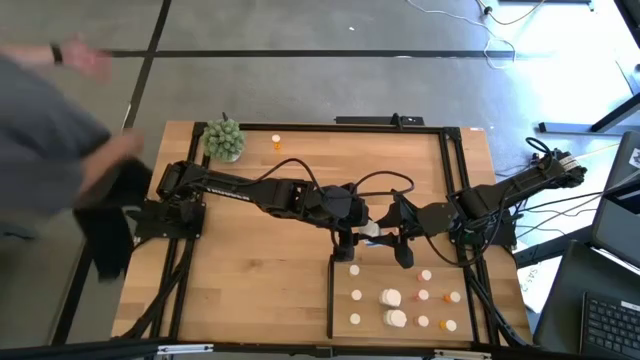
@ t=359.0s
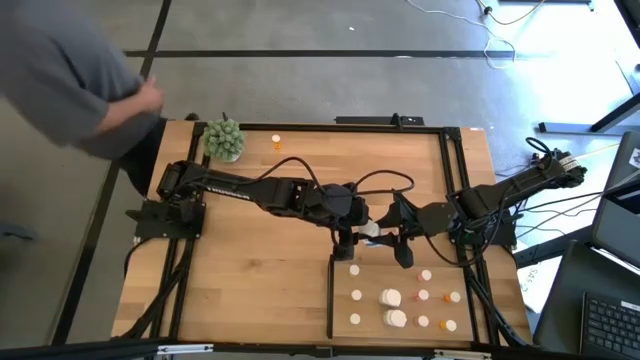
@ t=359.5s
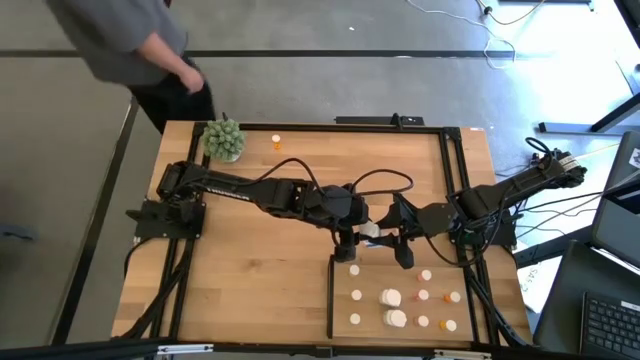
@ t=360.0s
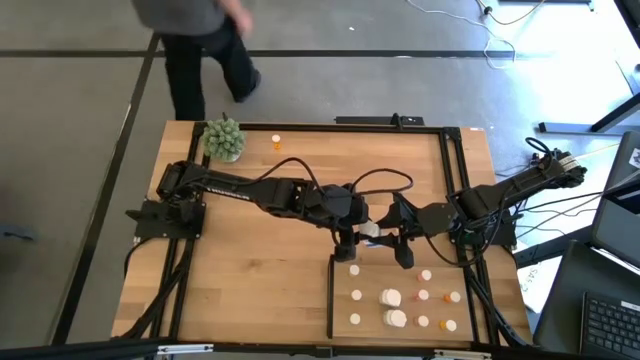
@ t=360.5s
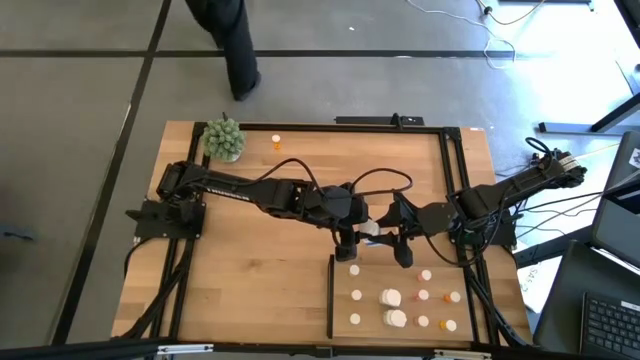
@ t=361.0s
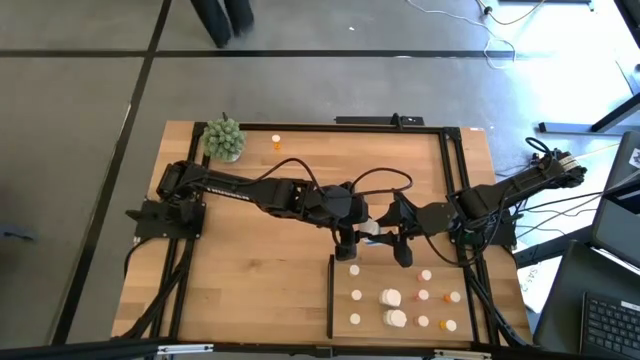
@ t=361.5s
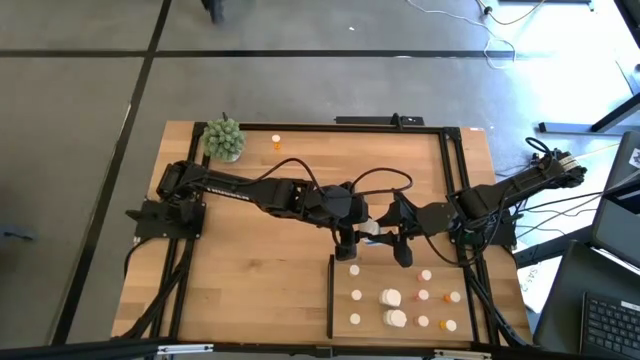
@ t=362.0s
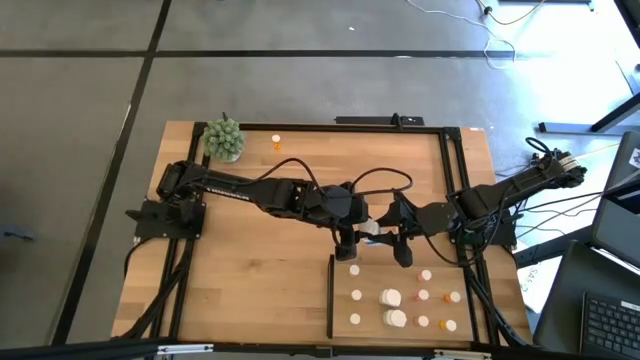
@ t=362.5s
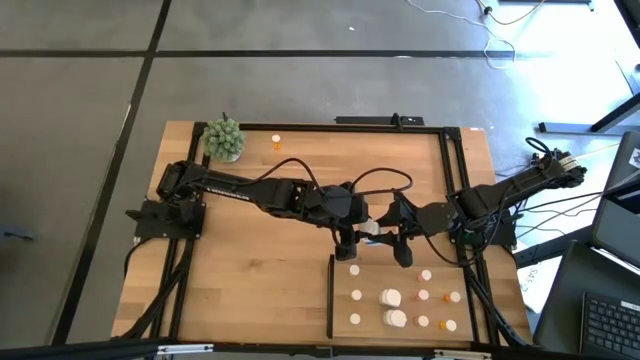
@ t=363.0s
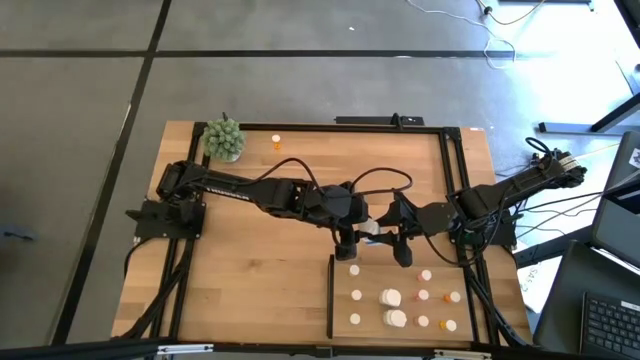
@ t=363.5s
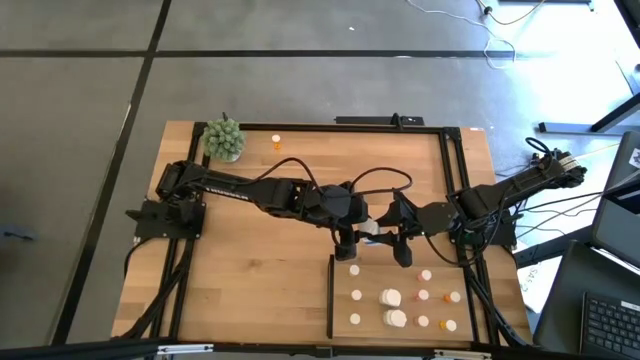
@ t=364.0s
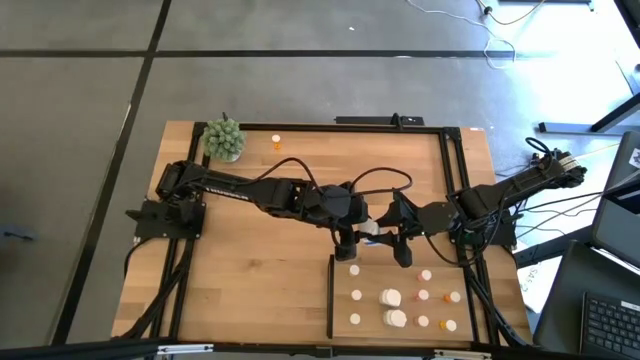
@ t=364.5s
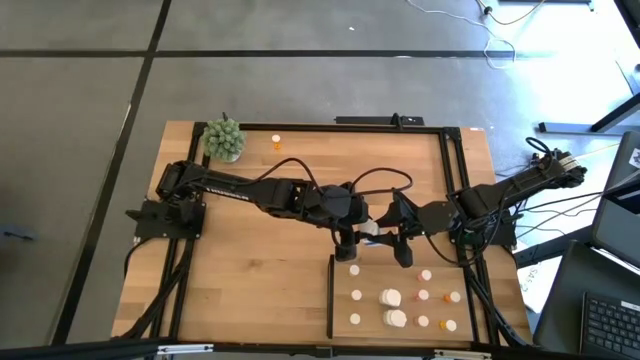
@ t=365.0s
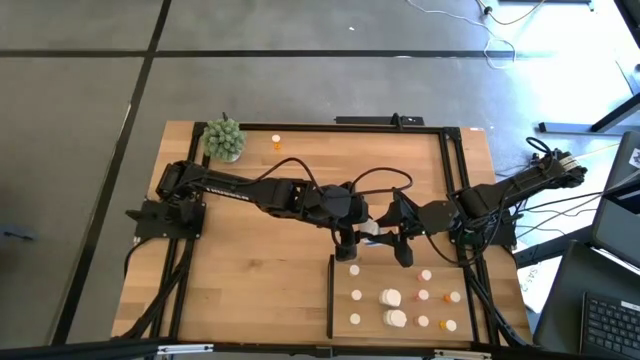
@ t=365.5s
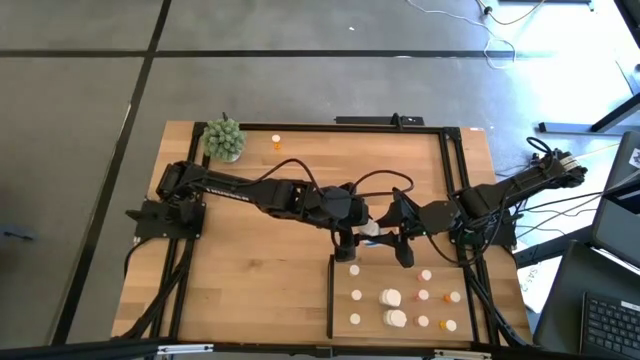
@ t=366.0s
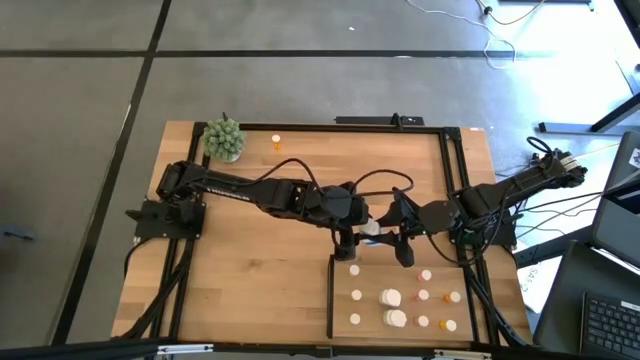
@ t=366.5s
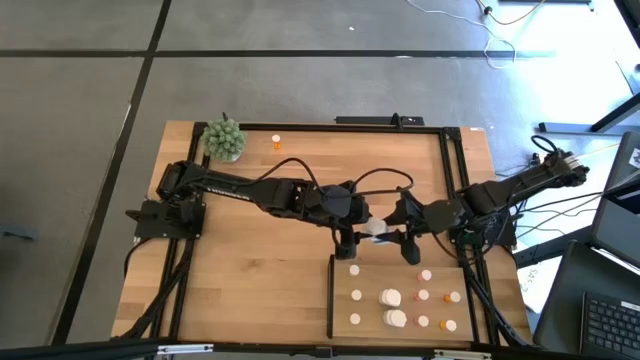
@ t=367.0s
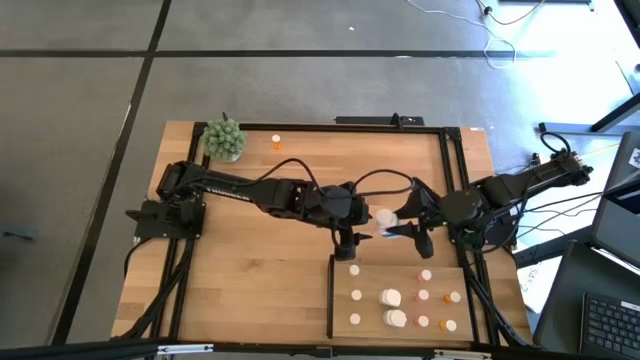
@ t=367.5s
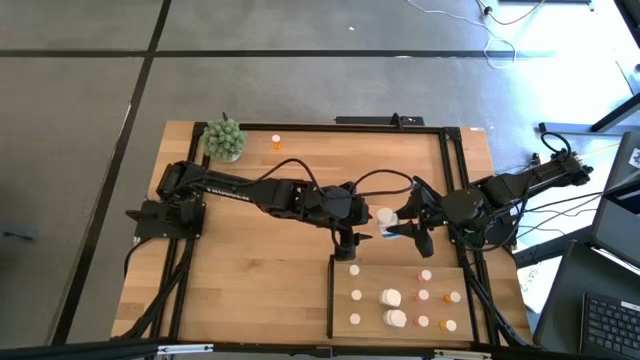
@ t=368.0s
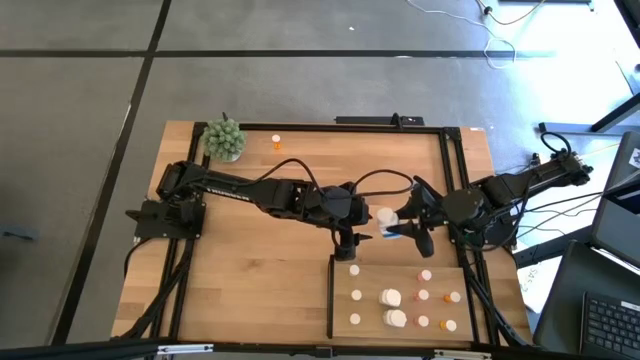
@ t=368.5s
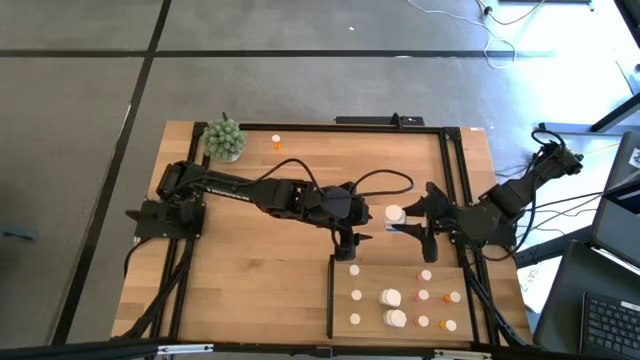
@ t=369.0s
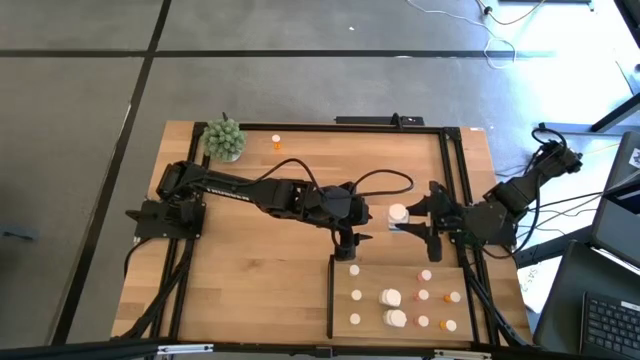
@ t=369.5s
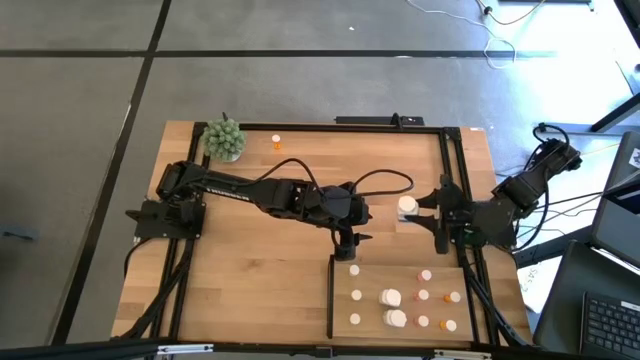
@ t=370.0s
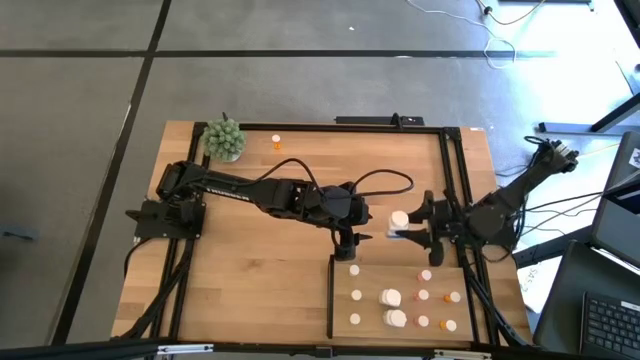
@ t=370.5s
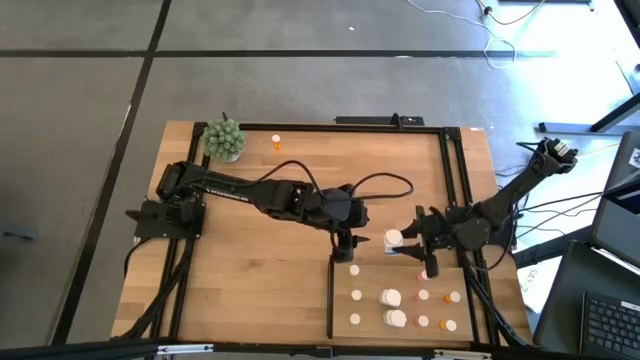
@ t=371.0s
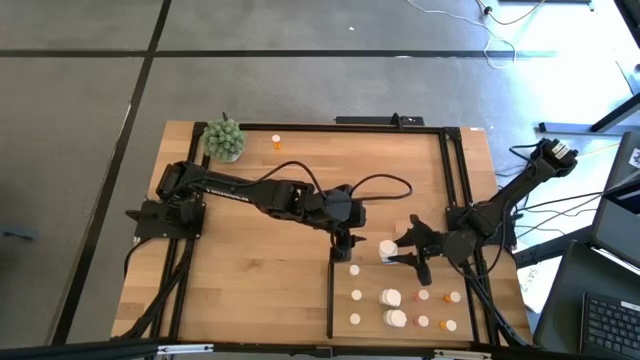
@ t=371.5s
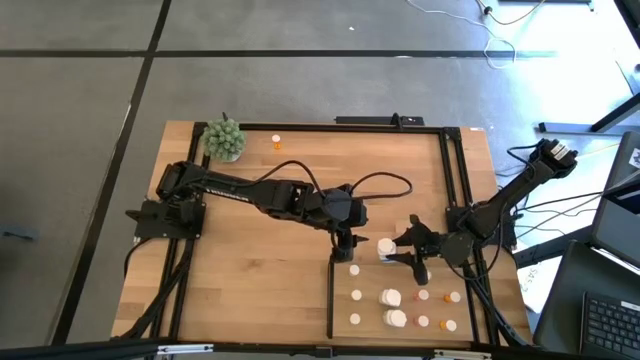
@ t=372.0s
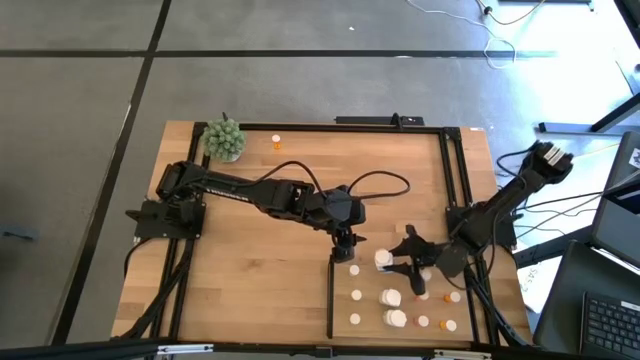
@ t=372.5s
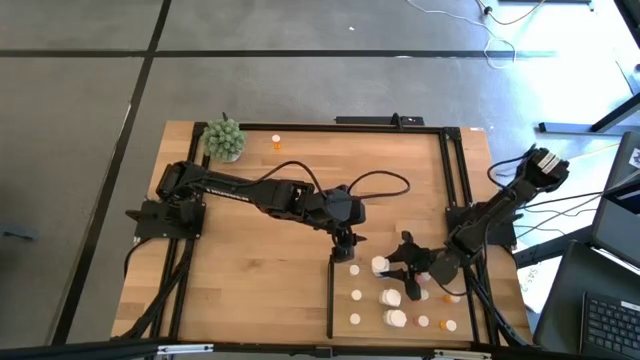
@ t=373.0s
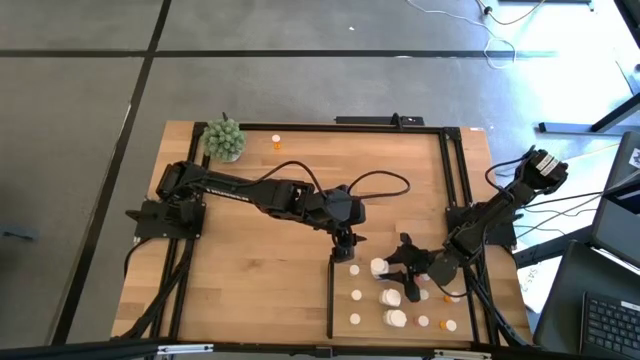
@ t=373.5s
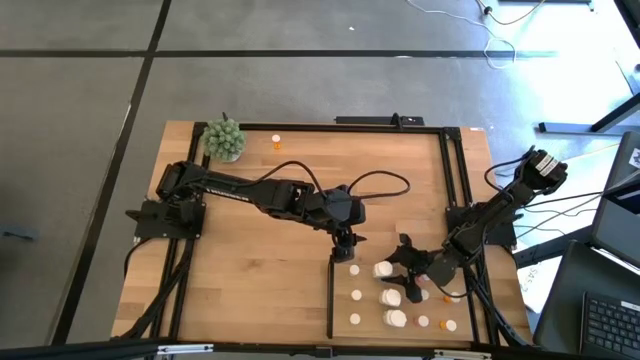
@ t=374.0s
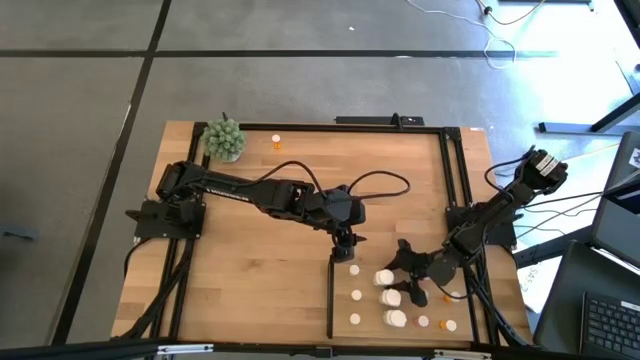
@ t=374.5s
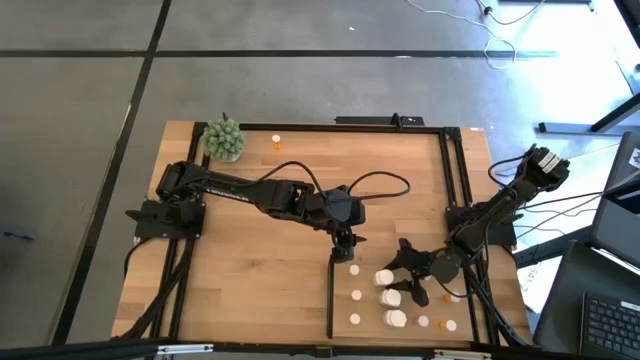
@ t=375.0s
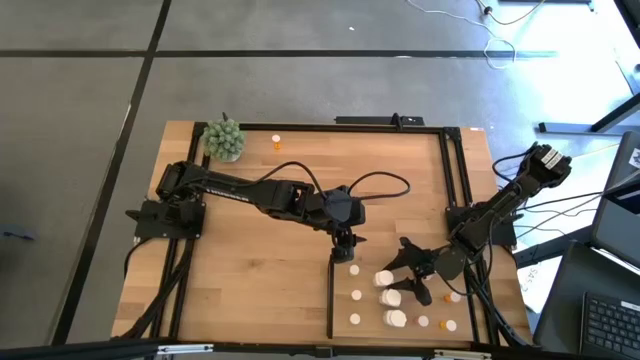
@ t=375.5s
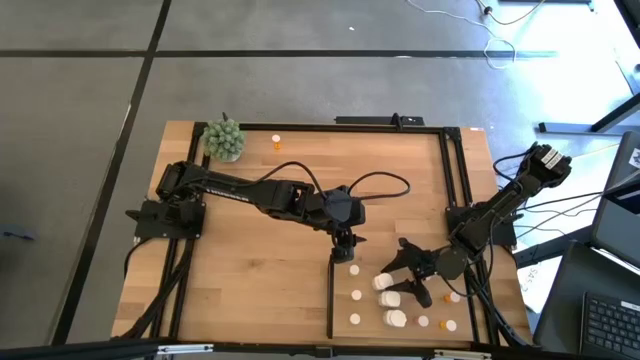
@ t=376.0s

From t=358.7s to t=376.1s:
Task: Pick and place medicine bottles onto shelf by color
Put the supplement bottle on the shelf aligned with the other supplement bottle

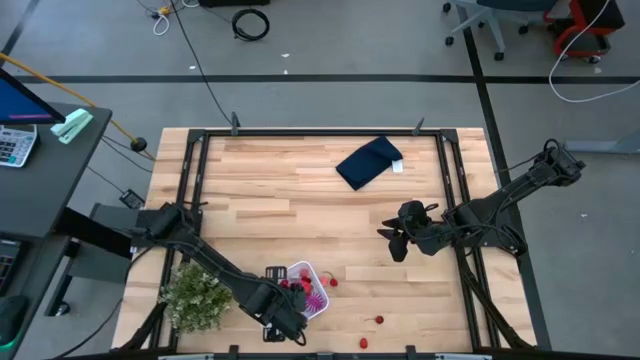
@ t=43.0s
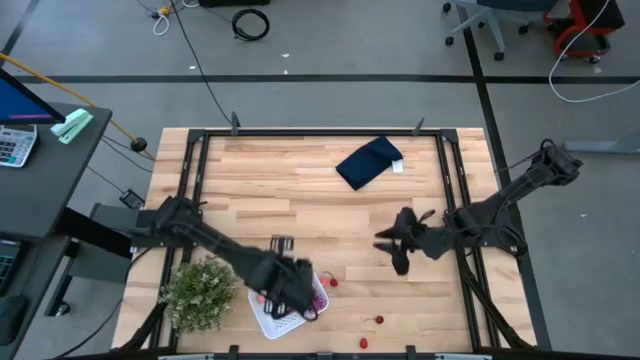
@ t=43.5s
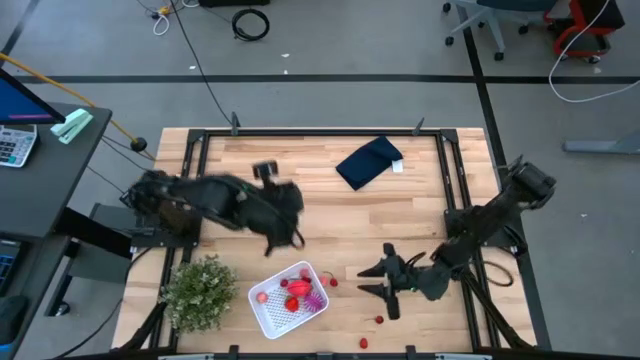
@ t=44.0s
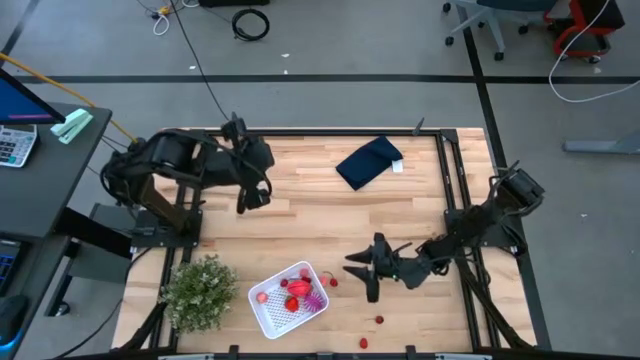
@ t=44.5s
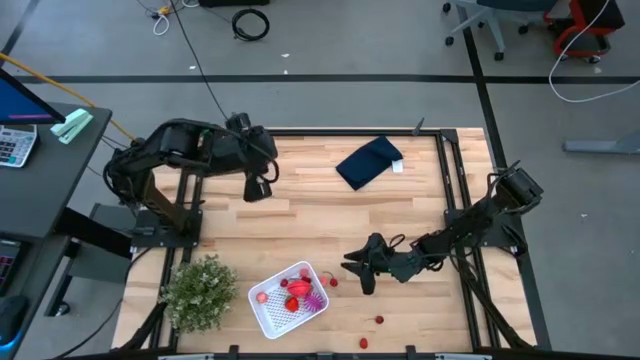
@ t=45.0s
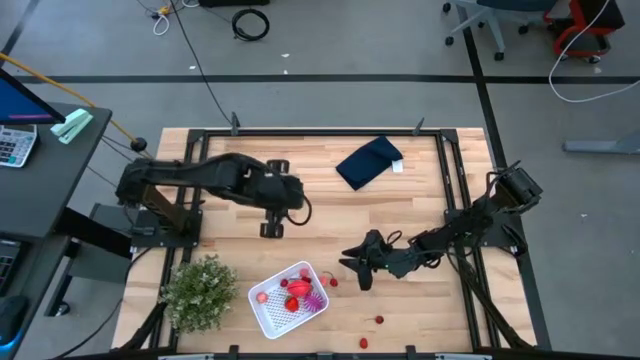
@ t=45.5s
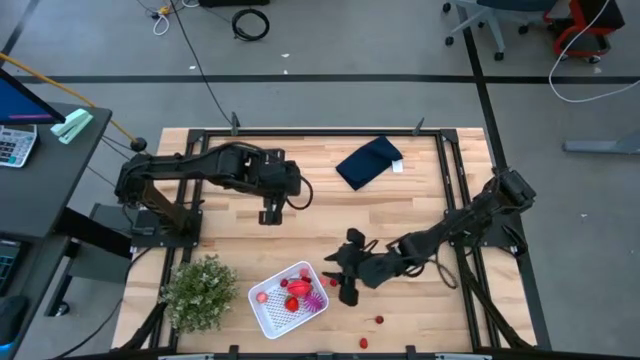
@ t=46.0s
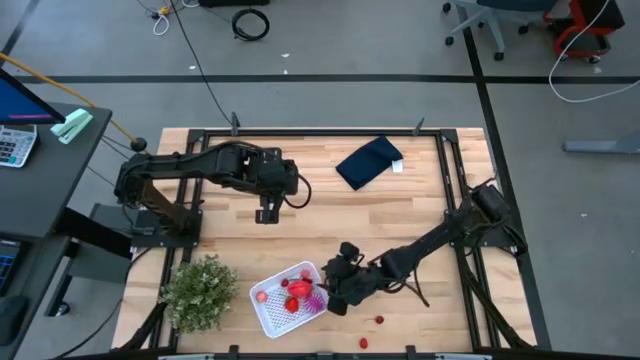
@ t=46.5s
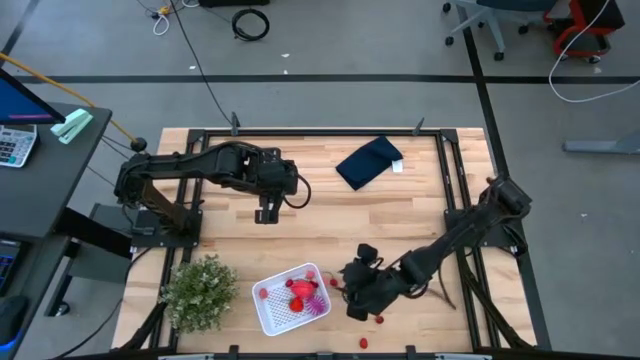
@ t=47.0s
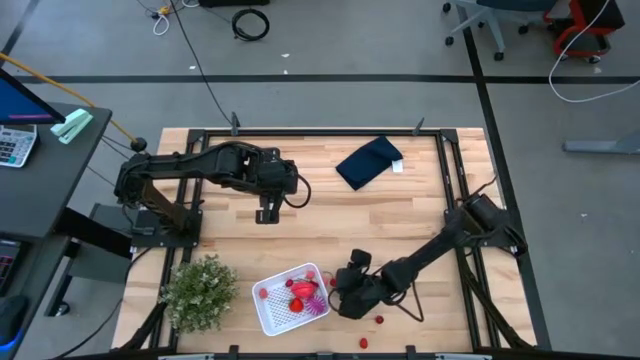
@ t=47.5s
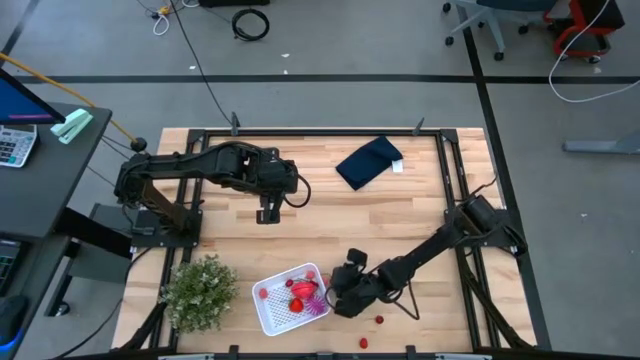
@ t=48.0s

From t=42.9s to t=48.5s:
Task: Pick and placing Produce into tupperware
Put the cherry into the white bin
